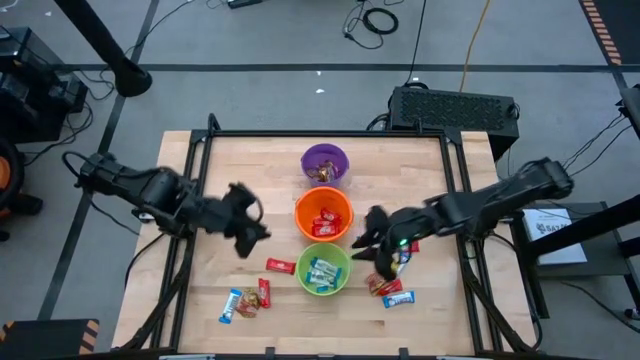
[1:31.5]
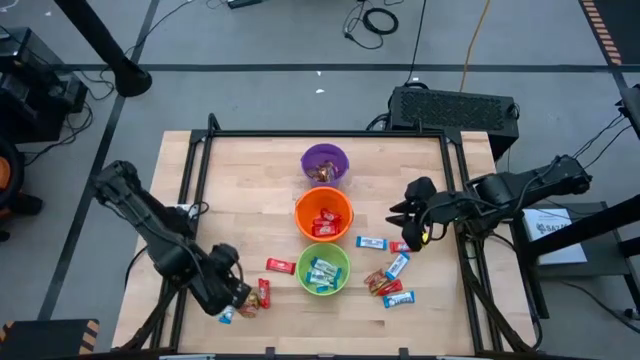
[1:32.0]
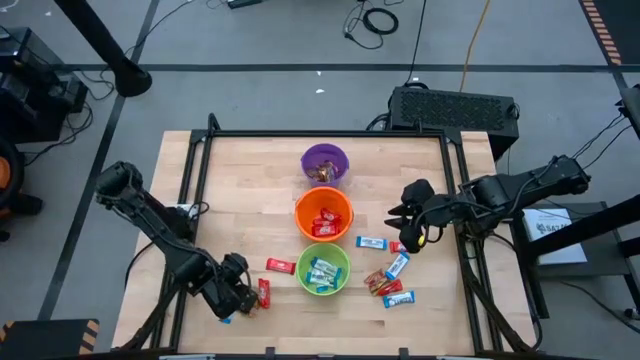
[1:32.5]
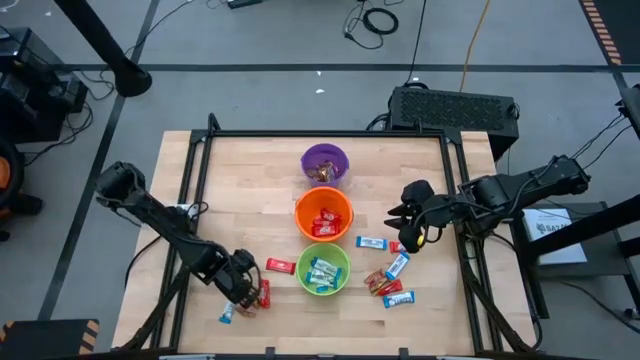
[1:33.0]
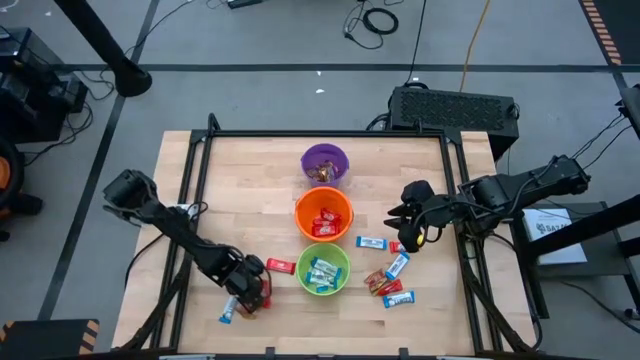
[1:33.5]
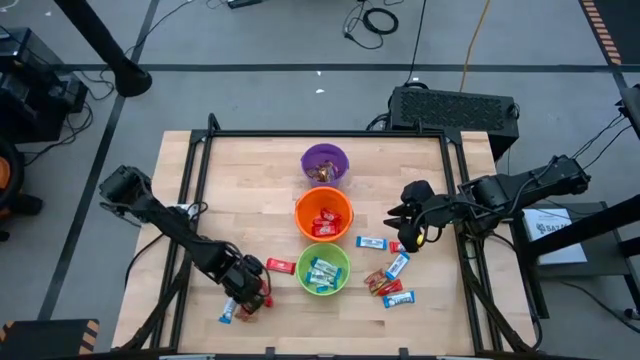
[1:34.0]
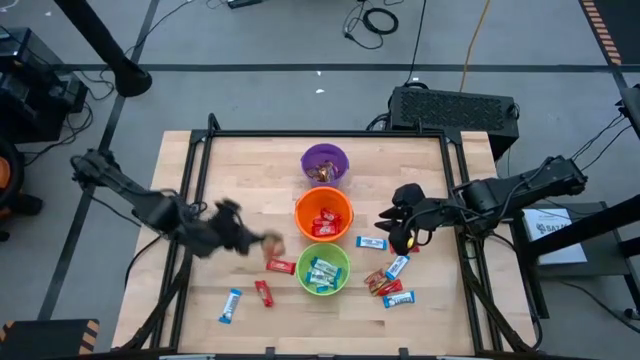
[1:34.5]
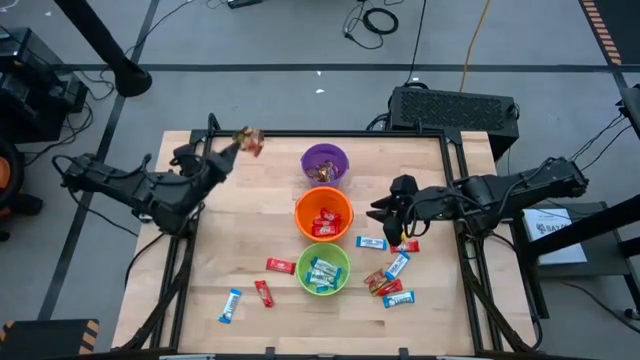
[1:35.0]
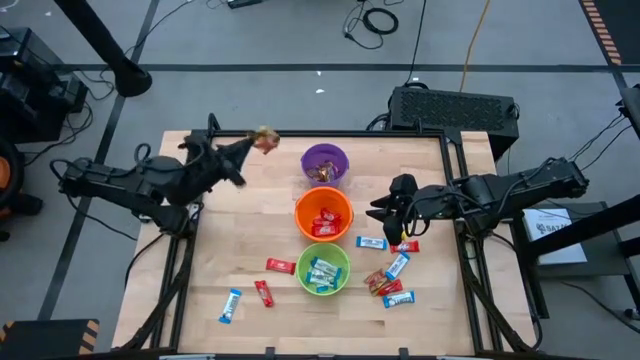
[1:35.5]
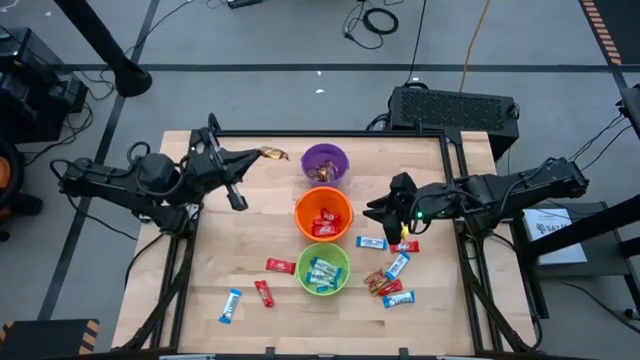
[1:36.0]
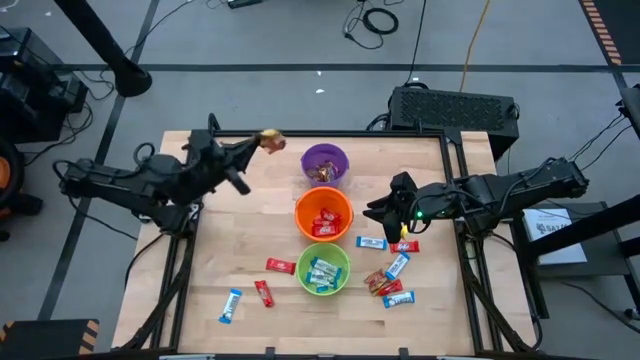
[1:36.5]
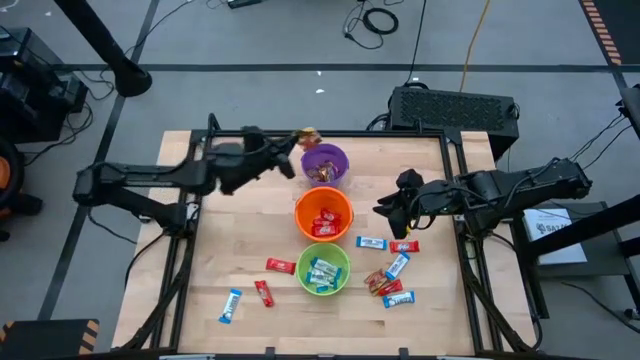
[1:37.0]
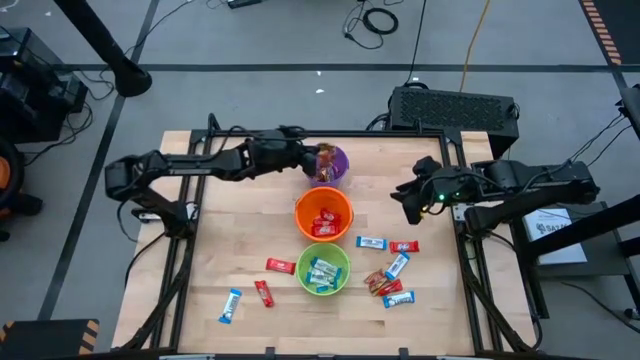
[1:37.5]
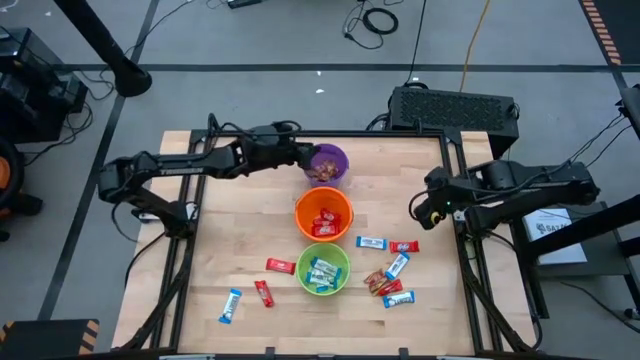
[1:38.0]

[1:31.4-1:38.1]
Task: Sort candy by brand, put in halloween buckets
Put golden candy into the purple bucket

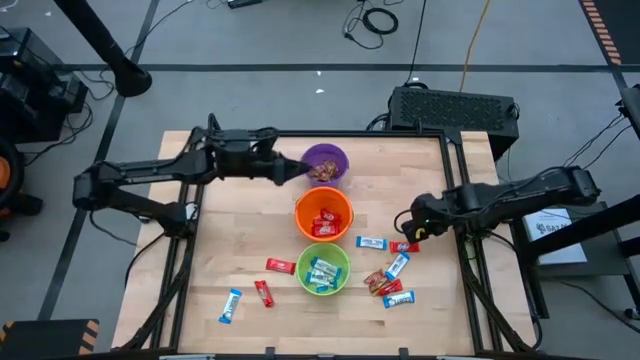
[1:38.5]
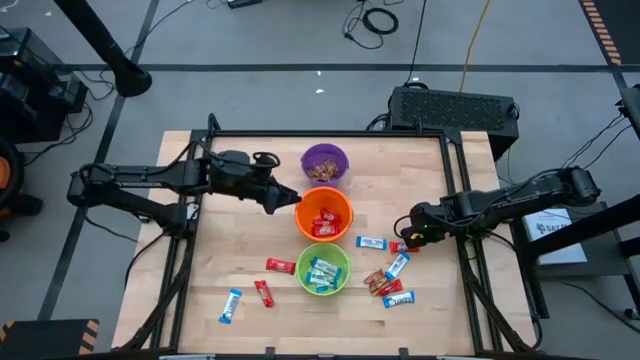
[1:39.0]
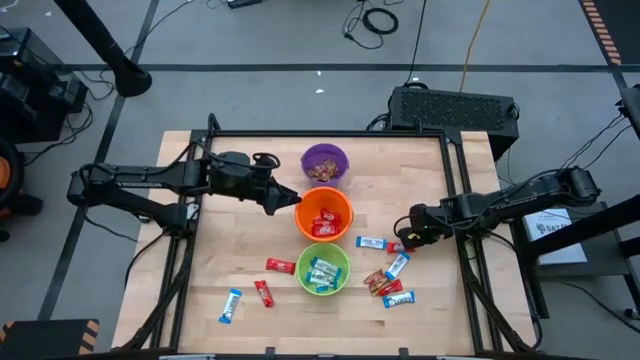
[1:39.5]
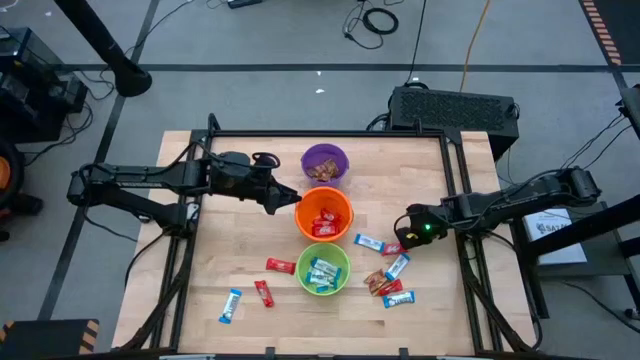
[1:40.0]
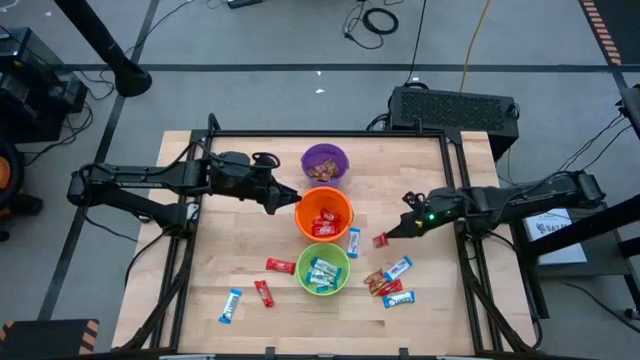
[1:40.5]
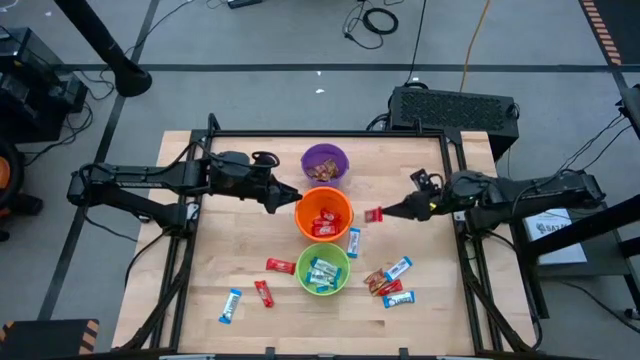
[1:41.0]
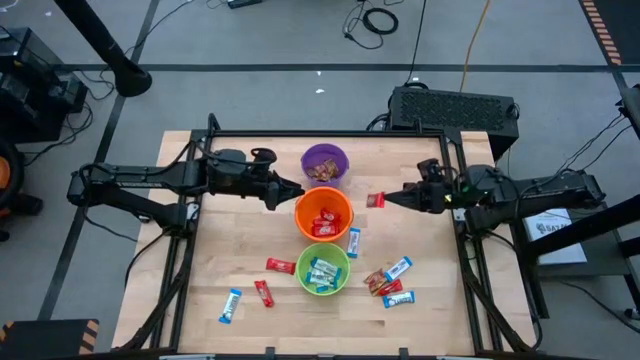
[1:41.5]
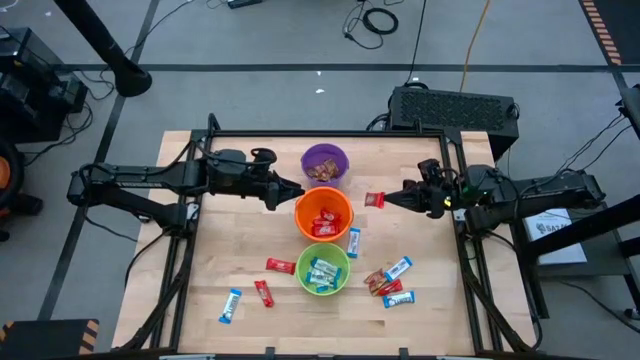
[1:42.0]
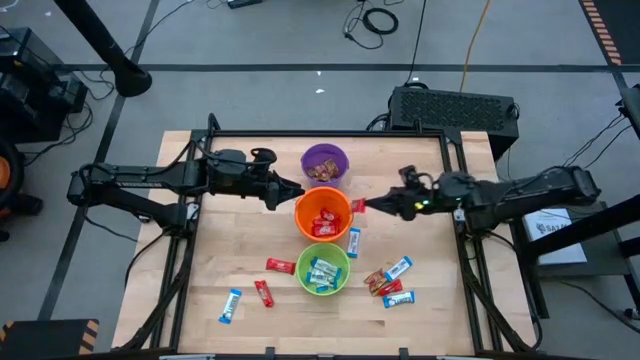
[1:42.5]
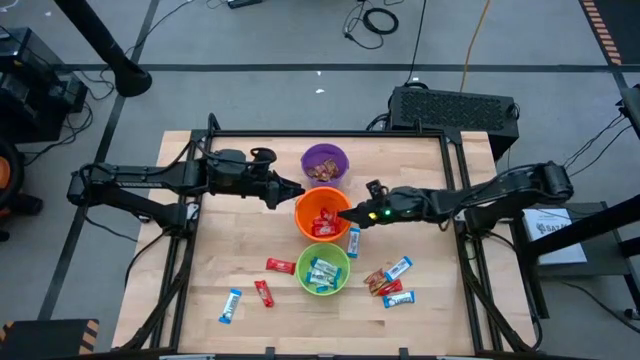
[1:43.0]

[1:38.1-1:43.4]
Put red chocolate bar into the orange bucket

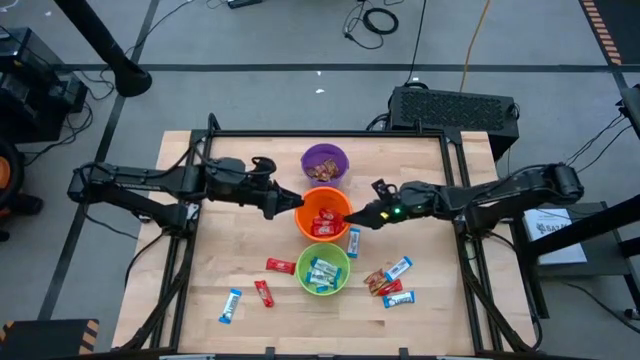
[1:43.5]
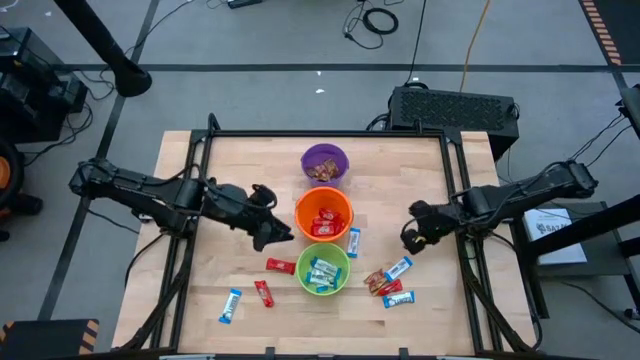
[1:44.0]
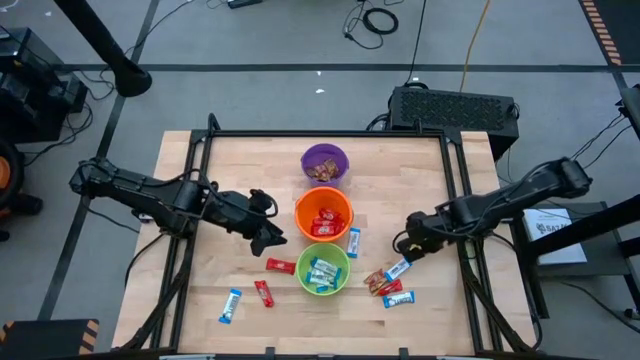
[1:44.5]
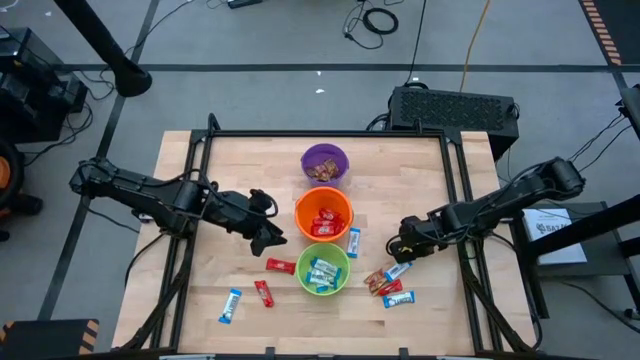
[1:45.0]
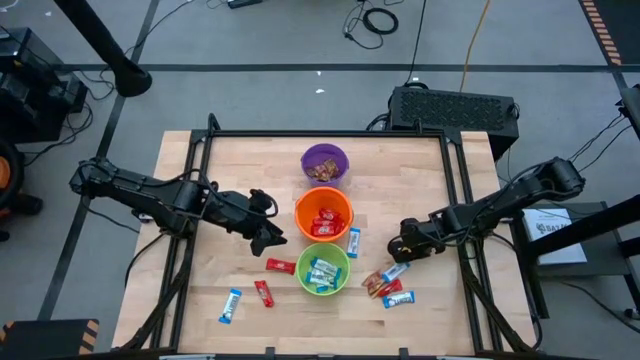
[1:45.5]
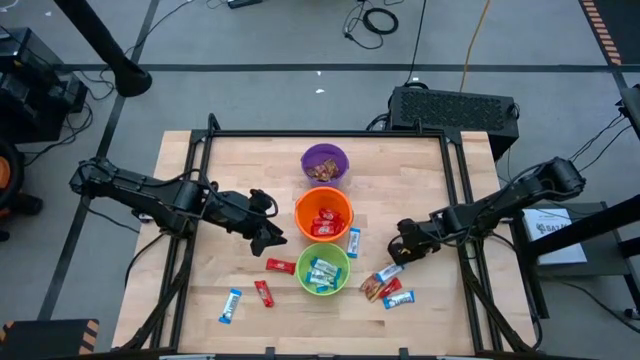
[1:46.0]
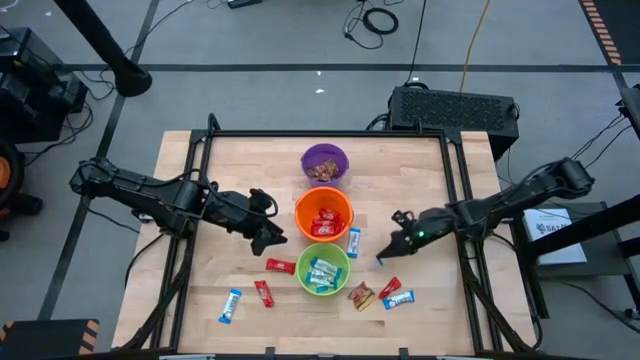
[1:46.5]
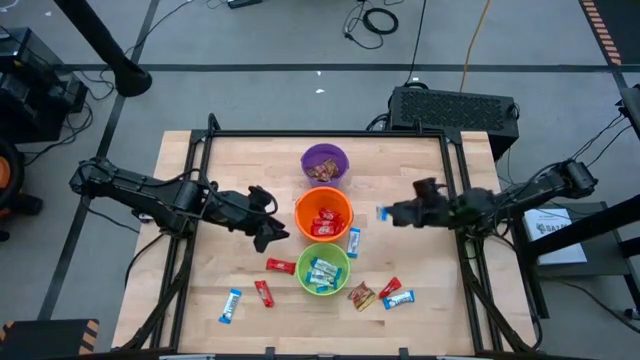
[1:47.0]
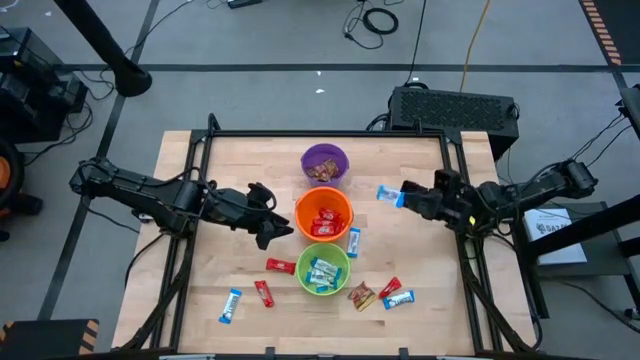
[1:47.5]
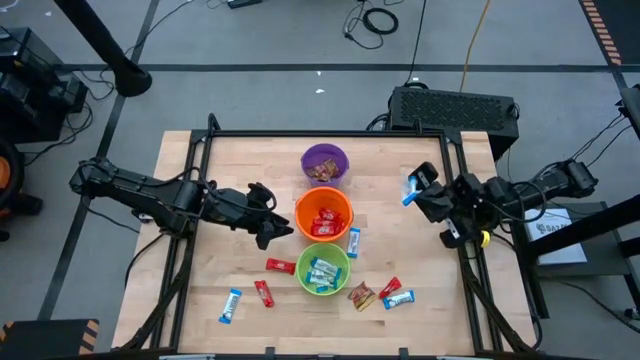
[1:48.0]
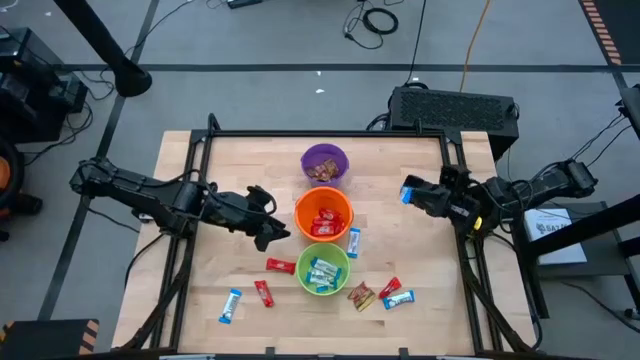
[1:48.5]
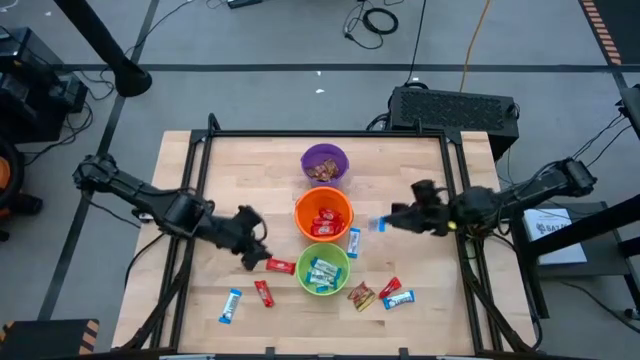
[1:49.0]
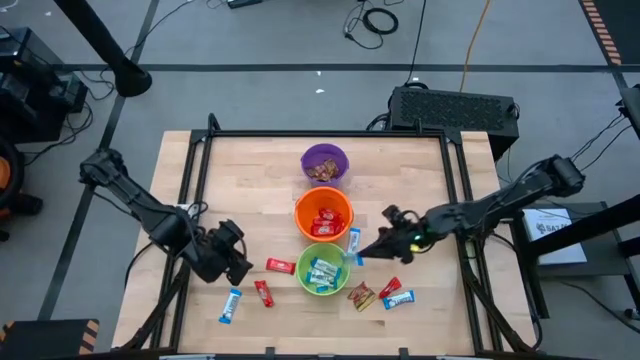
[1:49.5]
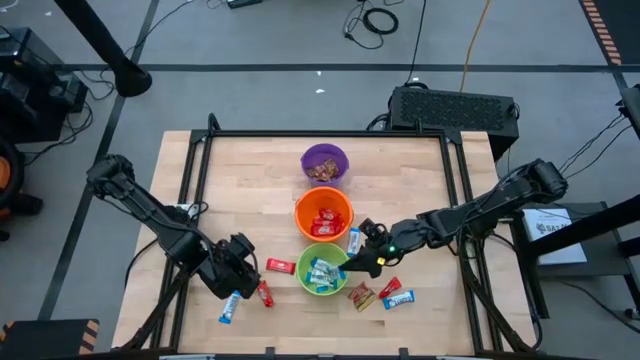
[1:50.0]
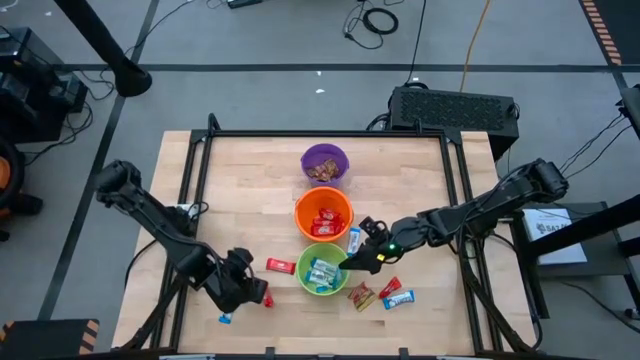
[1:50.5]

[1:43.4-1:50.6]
Put blue chocolate bar into the green bucket

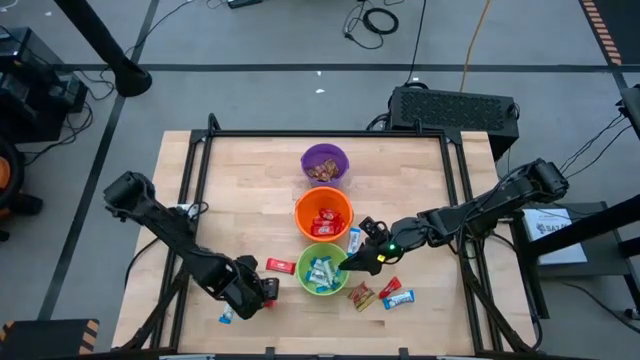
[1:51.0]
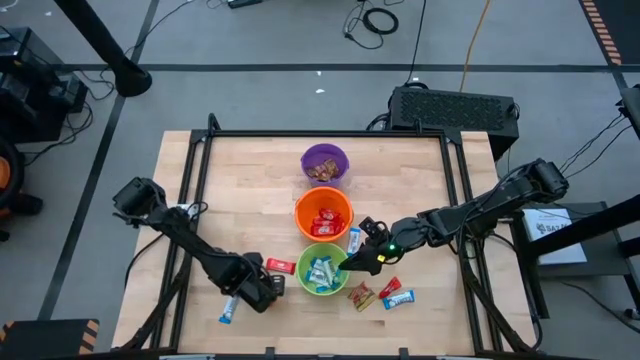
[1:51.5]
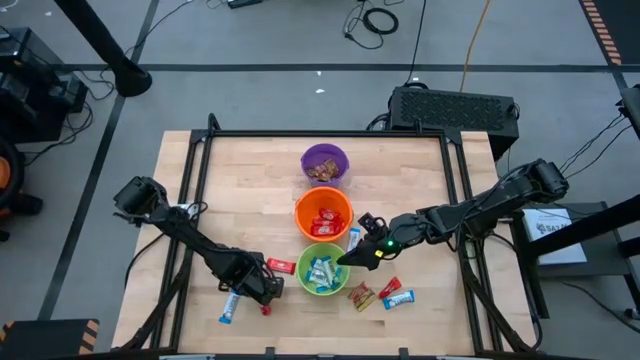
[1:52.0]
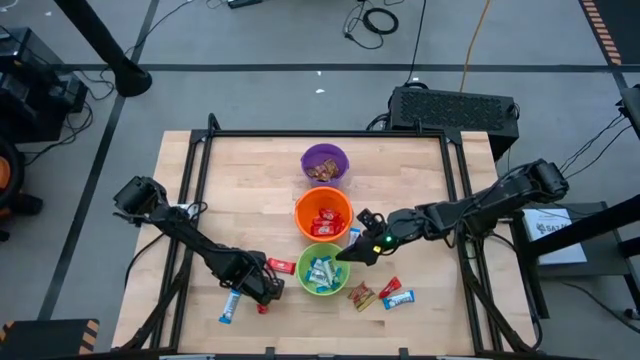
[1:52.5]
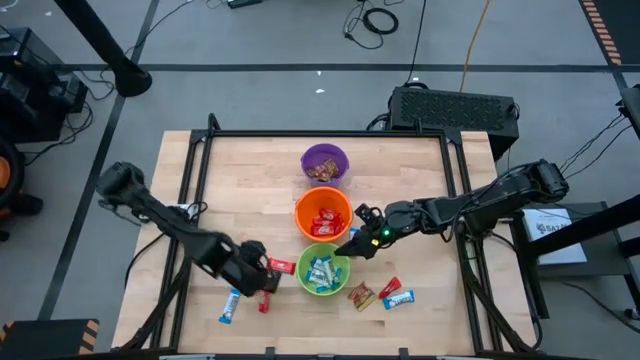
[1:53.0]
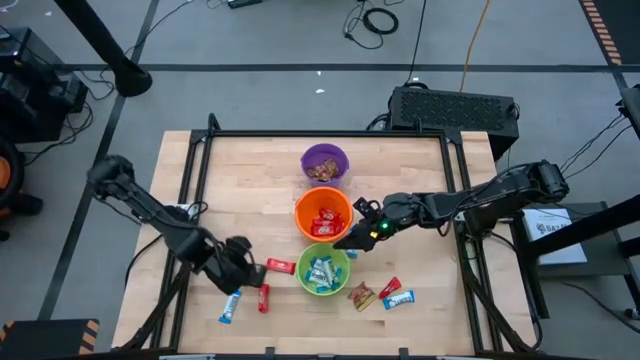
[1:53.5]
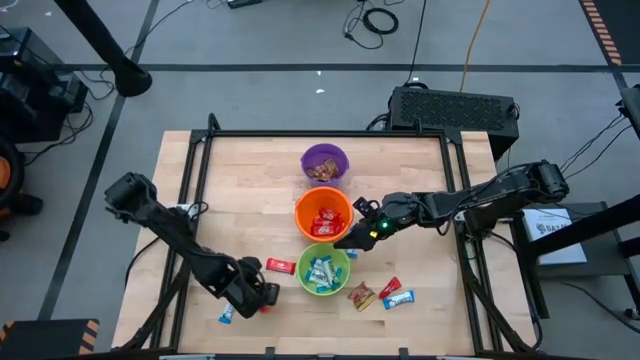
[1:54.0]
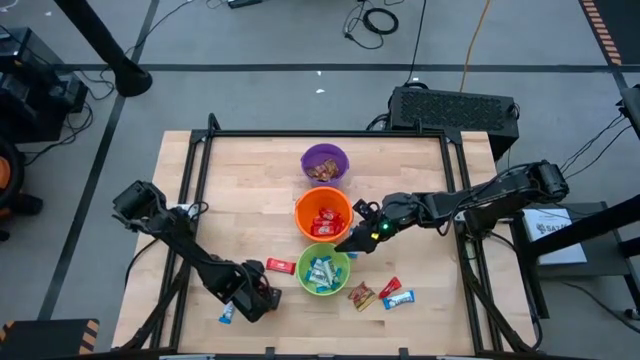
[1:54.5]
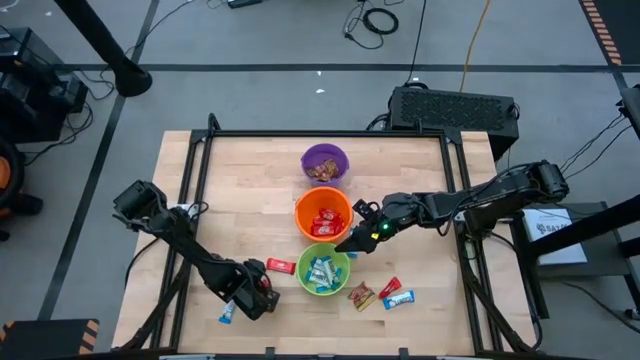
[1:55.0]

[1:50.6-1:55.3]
Put red chocolate bar into the orange bucket
